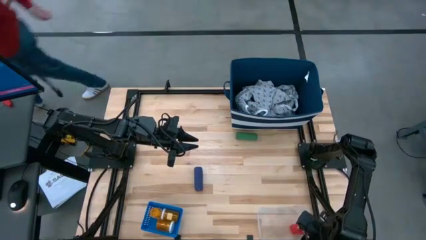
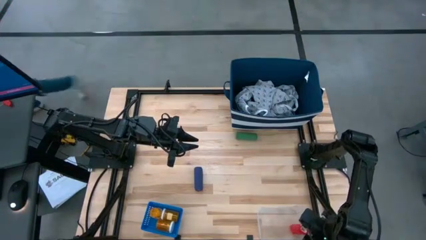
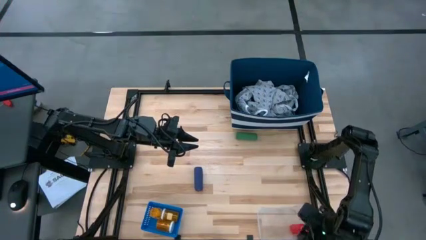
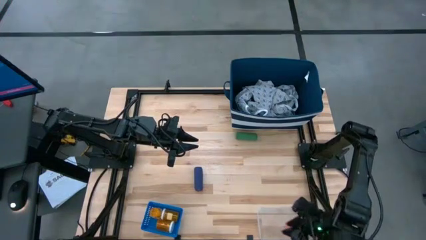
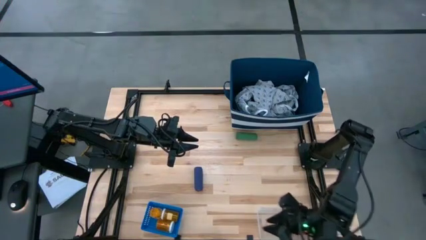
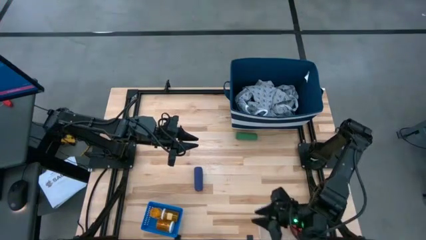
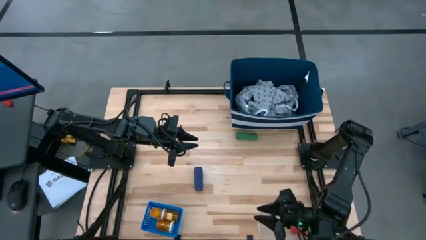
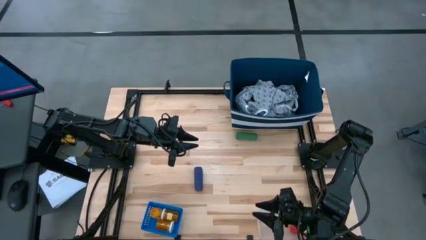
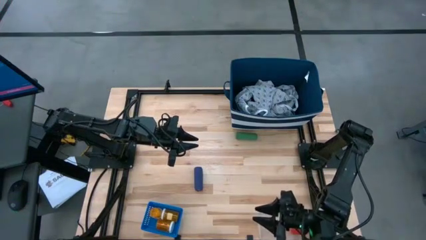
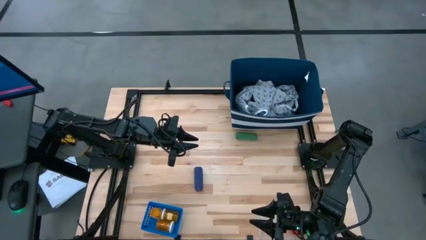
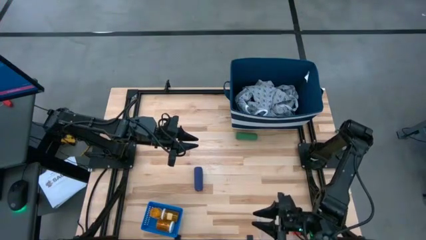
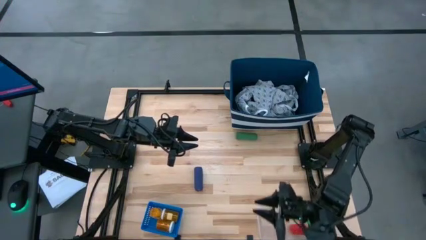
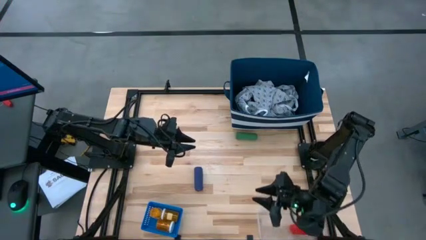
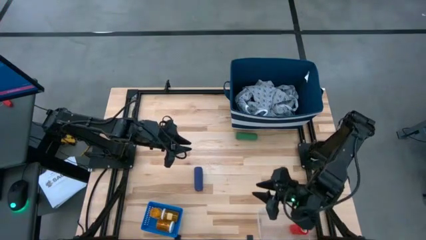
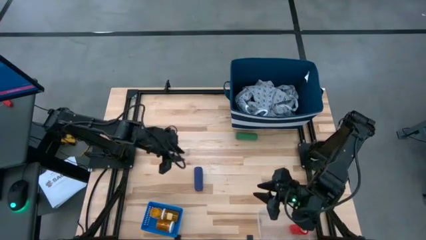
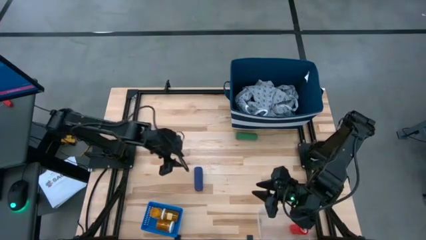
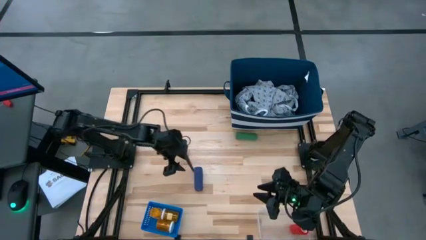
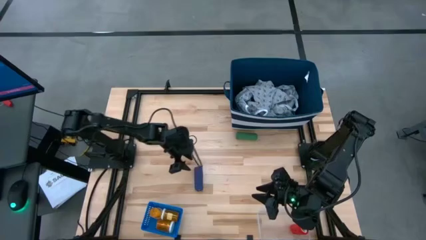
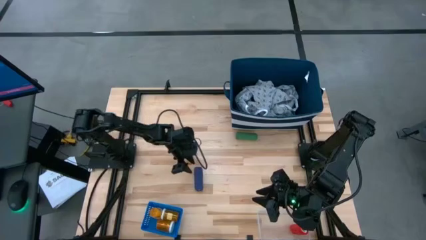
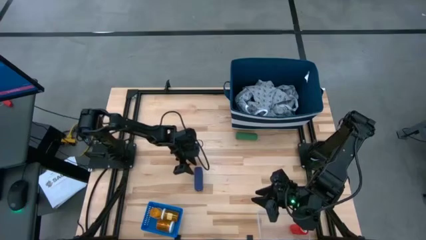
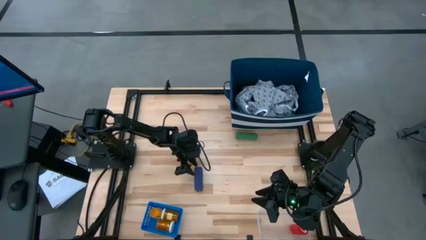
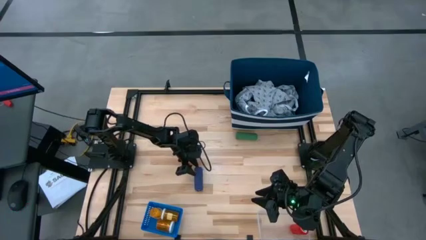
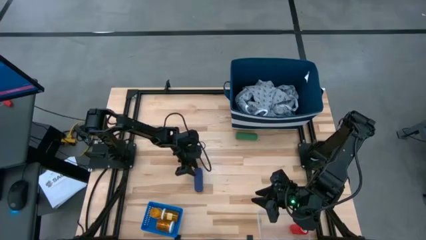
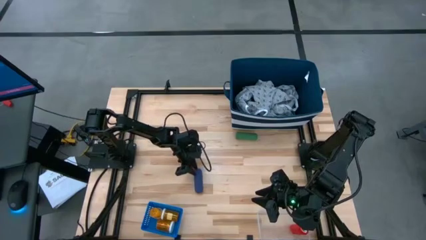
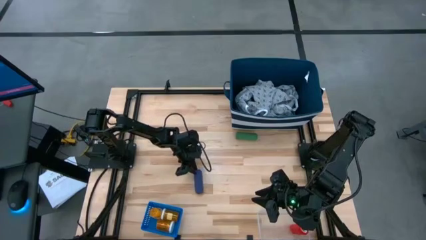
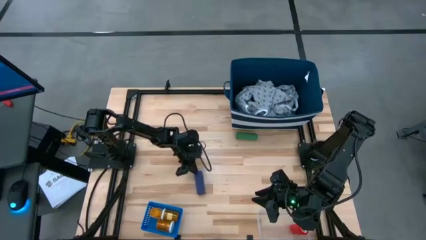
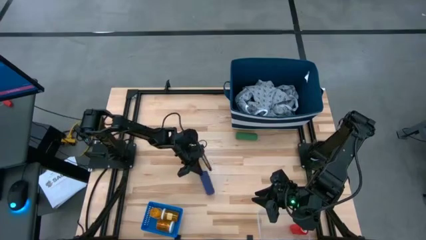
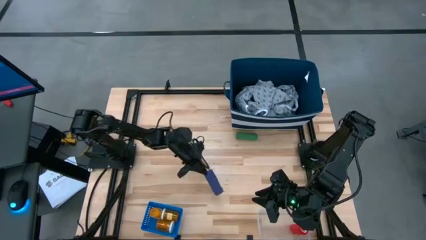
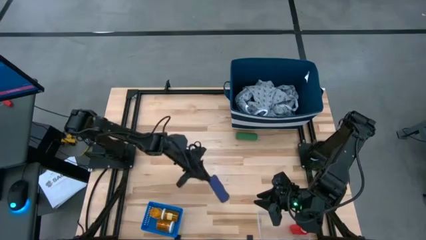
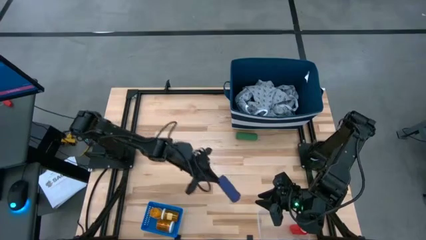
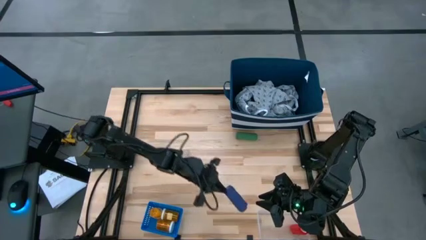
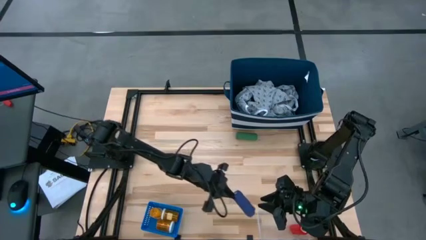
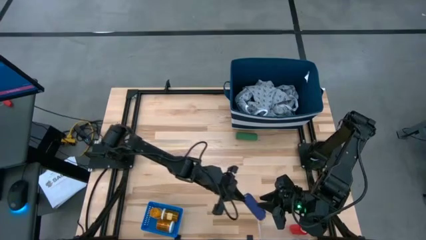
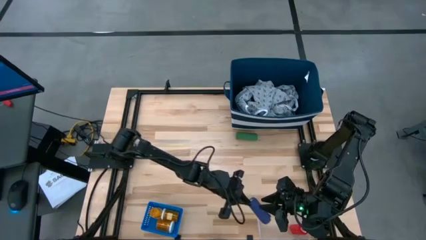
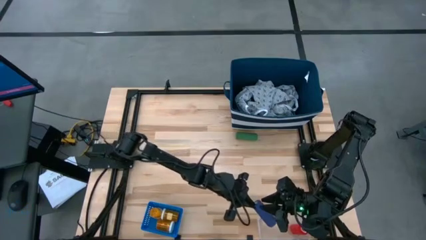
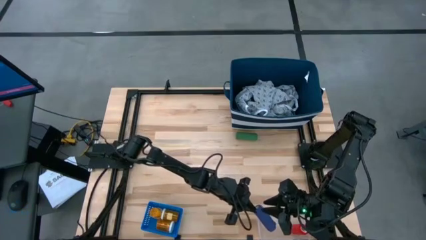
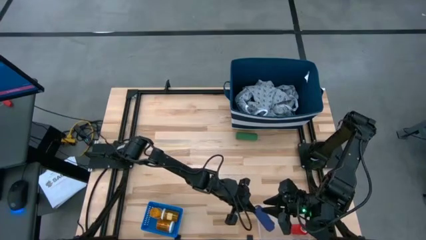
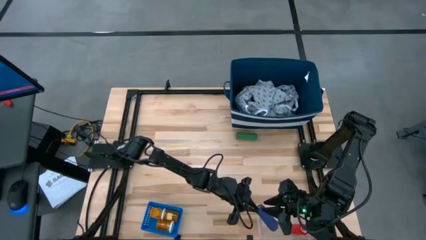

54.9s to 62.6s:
Task: Pick & place medical supplies in basket/bin
Put the blue bandage into the transparent bin

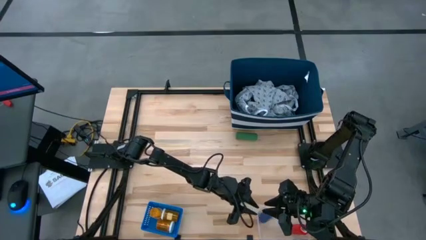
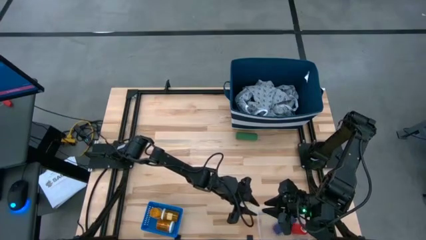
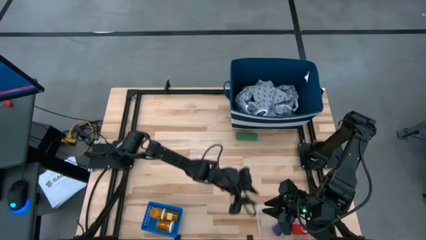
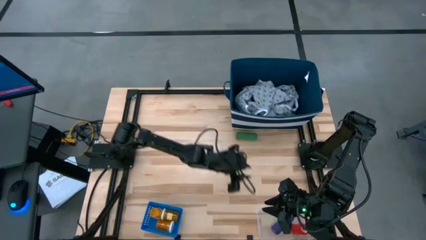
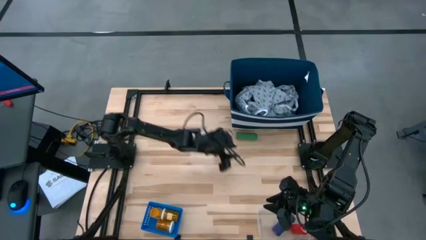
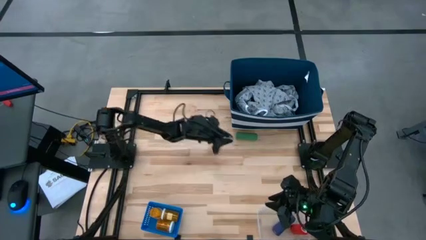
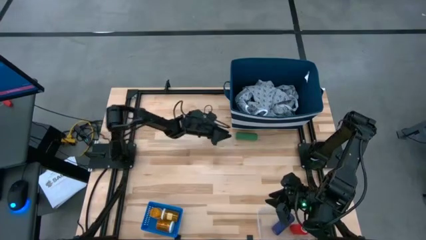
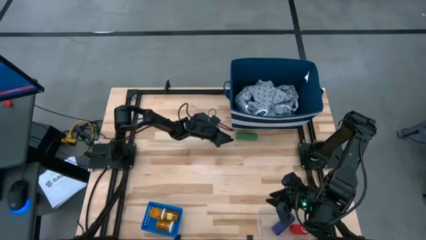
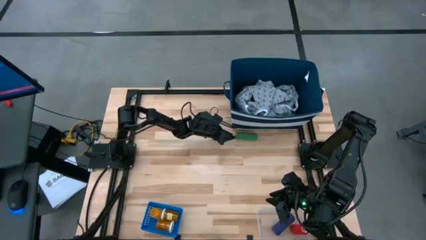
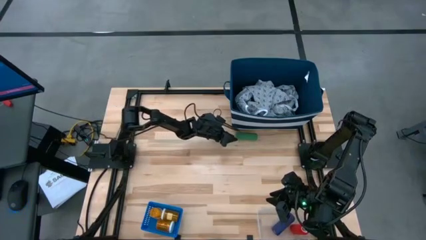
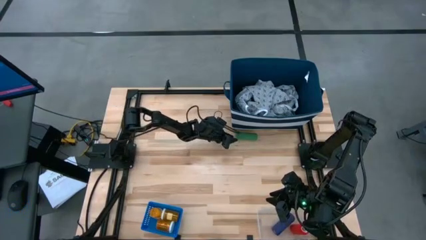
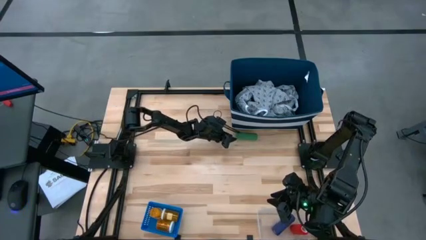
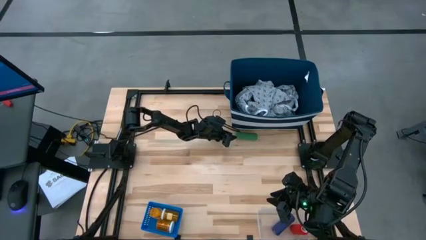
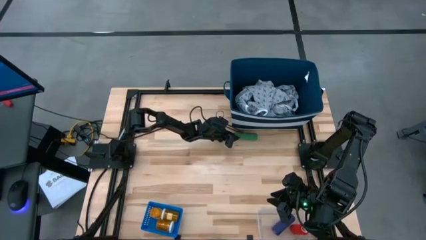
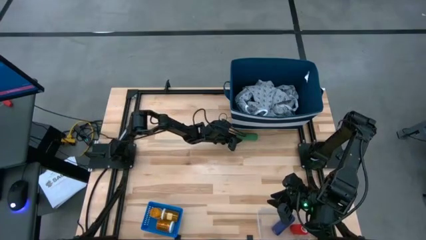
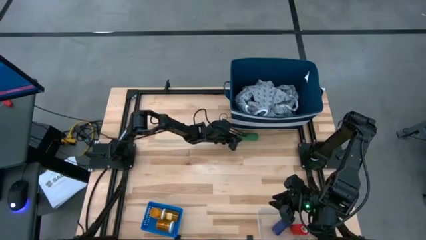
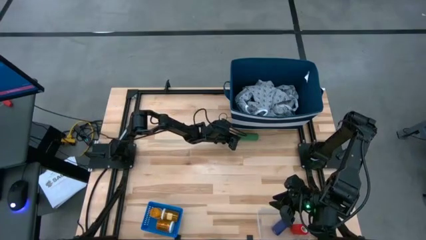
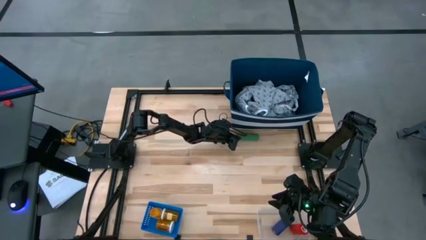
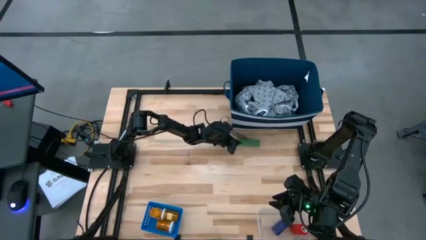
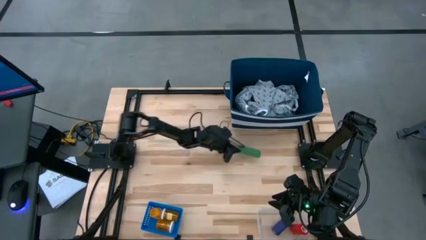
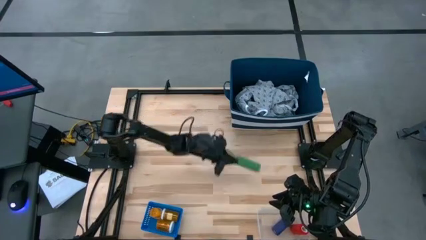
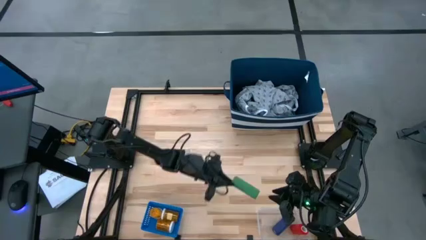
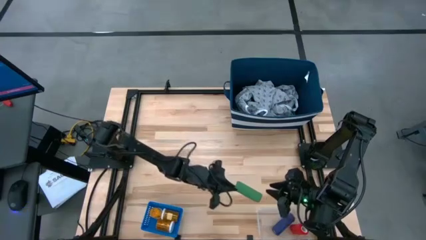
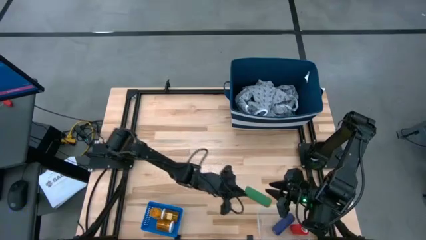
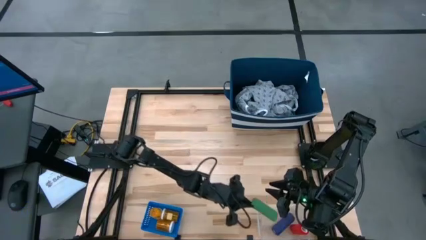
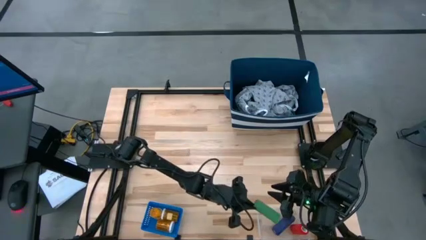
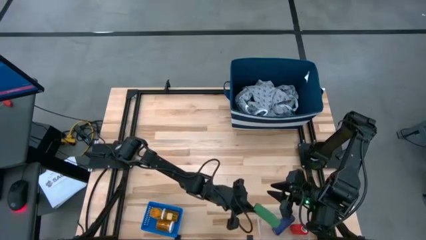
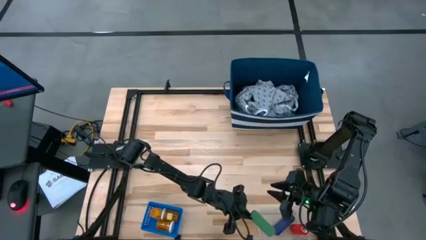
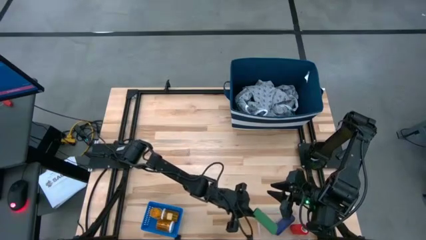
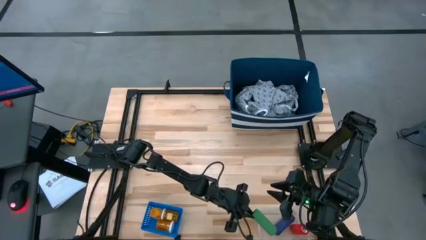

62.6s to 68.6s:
Put the green bandage into the transparent bin

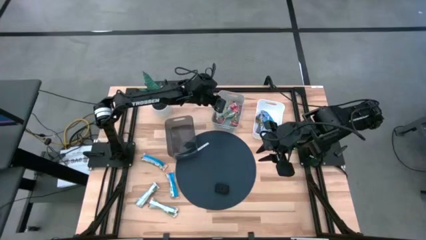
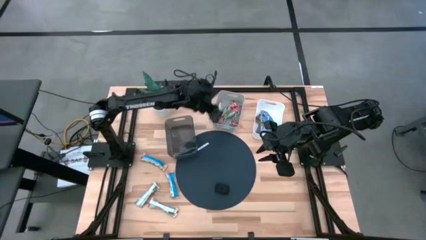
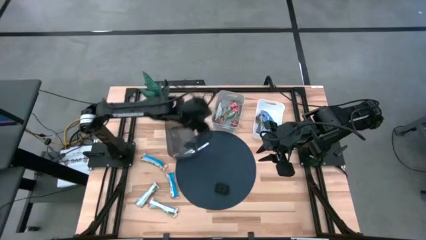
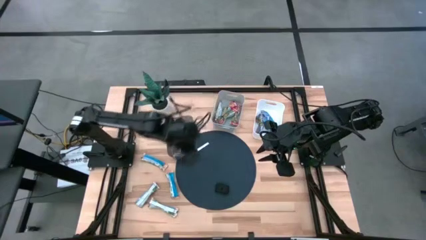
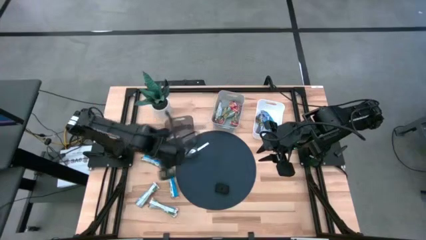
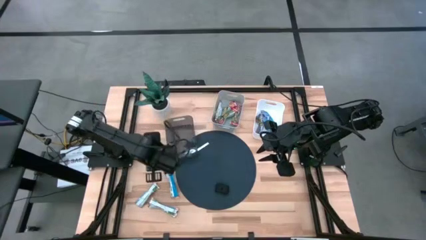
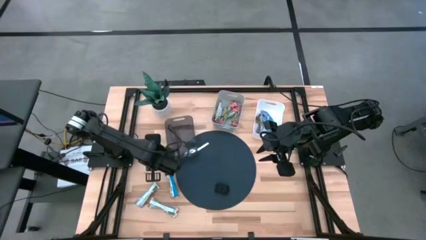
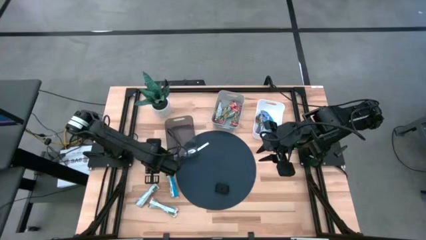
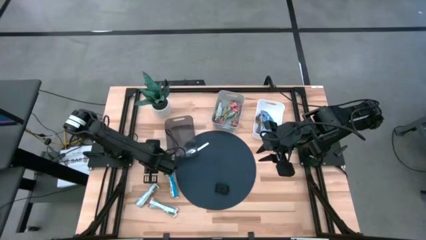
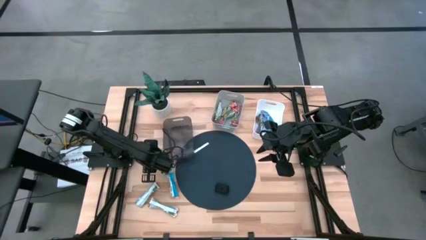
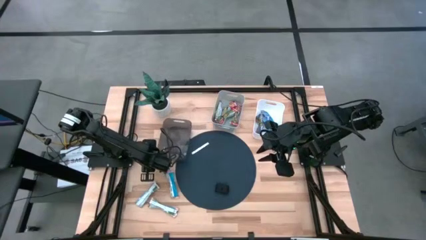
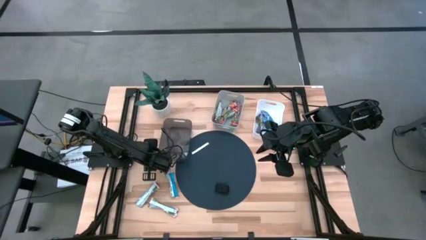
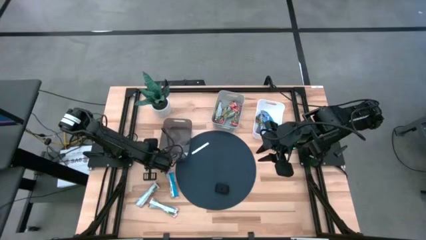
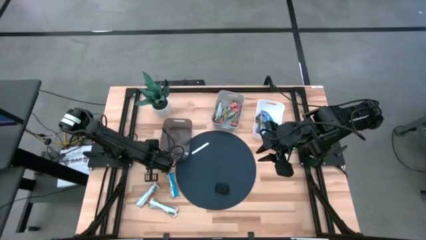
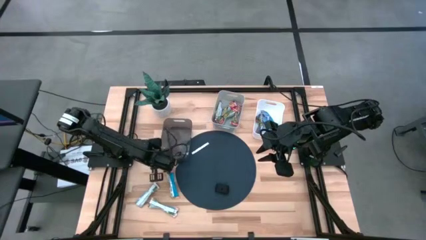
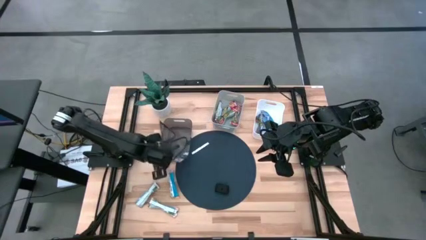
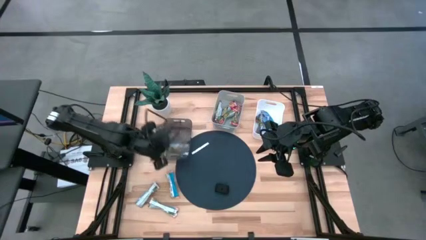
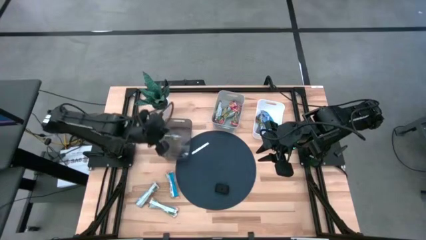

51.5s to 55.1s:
Task: Pick and place Granola Bars by type
Put the orange granola bar into the black transparent bin
